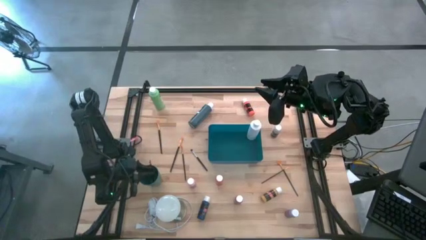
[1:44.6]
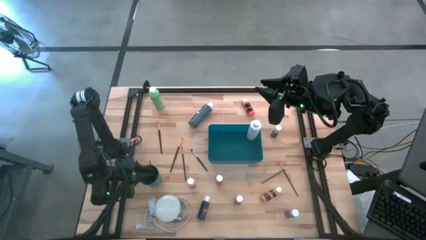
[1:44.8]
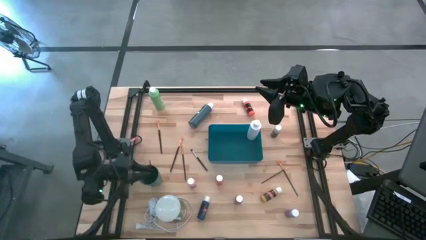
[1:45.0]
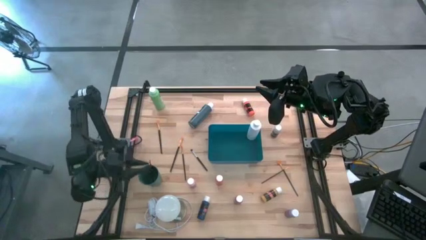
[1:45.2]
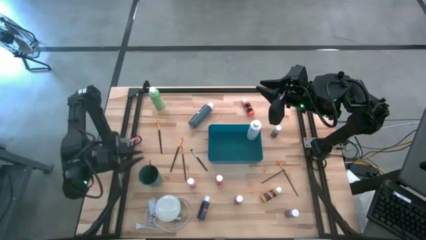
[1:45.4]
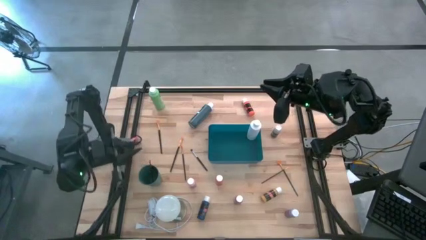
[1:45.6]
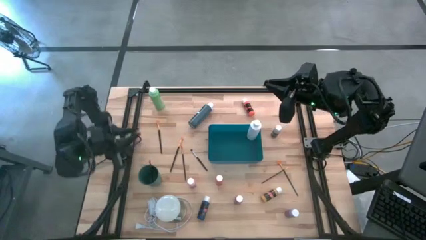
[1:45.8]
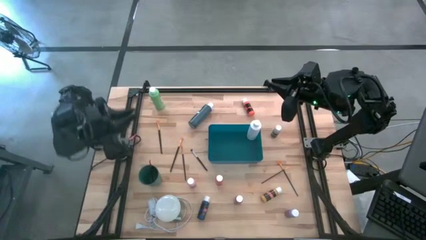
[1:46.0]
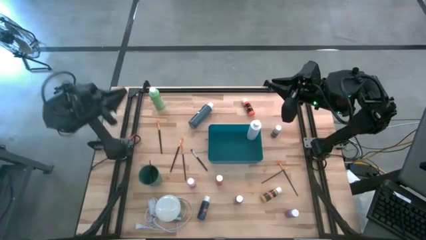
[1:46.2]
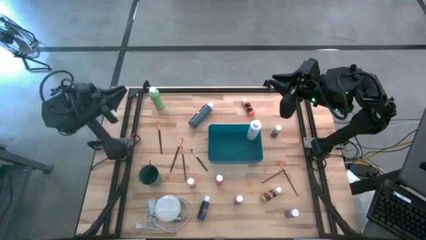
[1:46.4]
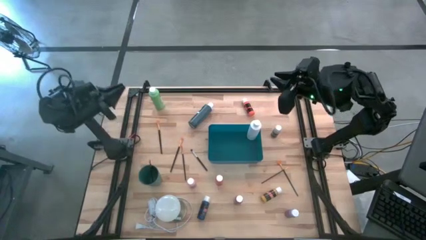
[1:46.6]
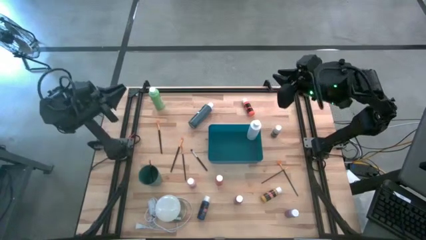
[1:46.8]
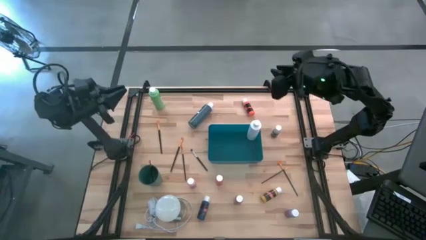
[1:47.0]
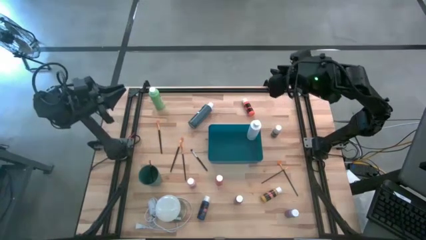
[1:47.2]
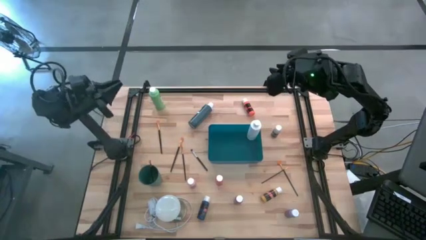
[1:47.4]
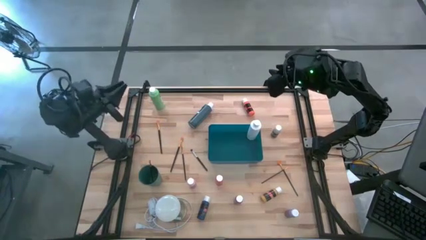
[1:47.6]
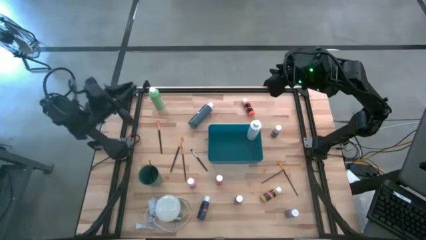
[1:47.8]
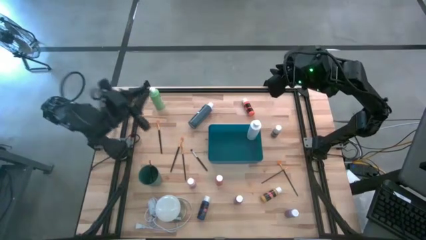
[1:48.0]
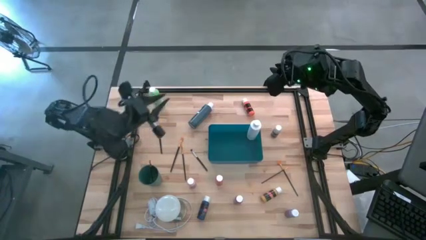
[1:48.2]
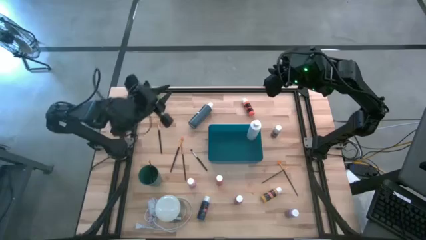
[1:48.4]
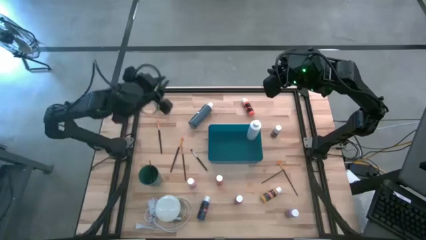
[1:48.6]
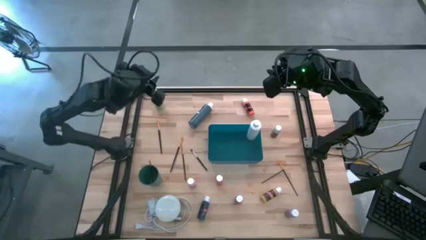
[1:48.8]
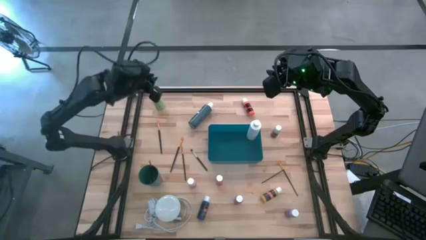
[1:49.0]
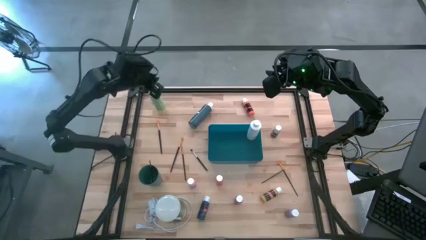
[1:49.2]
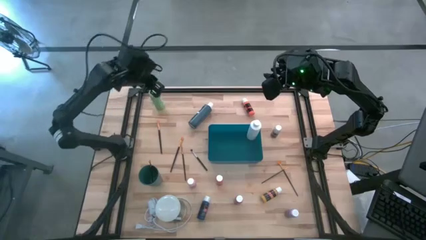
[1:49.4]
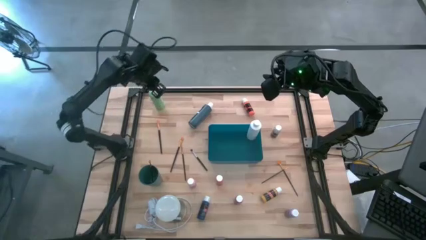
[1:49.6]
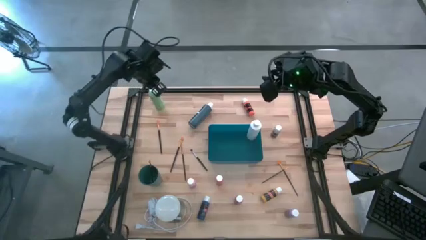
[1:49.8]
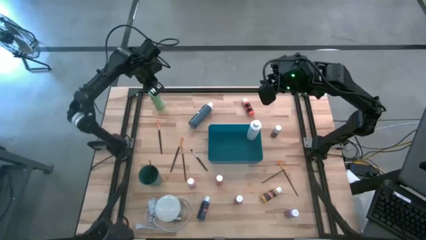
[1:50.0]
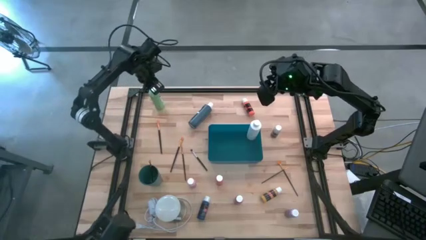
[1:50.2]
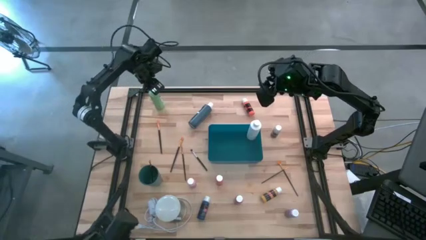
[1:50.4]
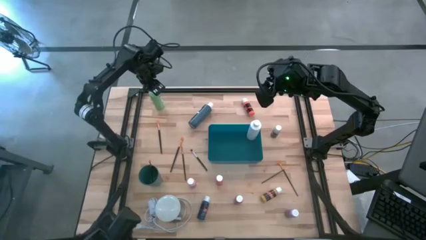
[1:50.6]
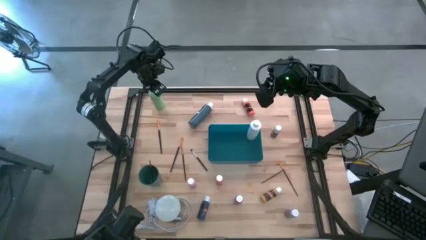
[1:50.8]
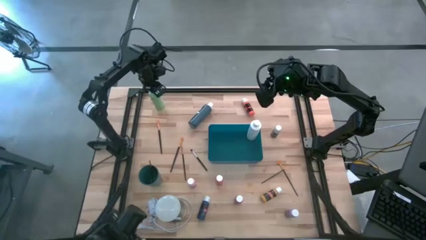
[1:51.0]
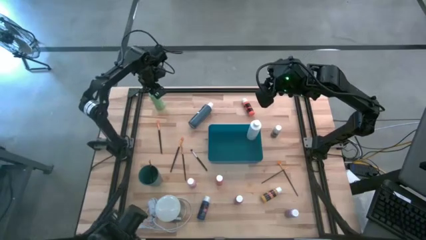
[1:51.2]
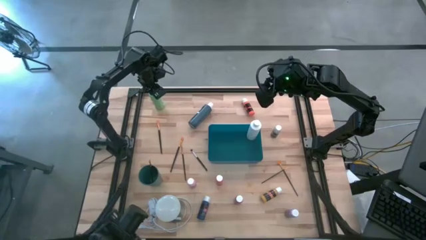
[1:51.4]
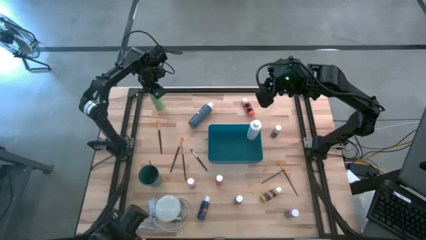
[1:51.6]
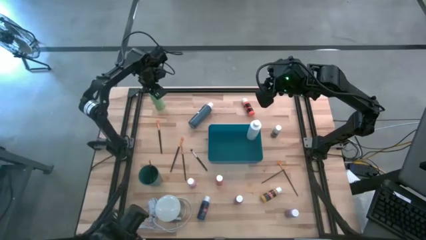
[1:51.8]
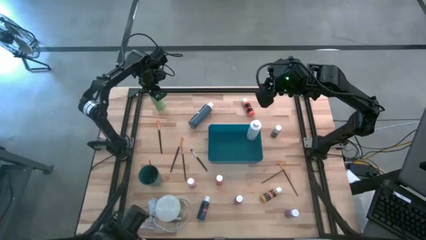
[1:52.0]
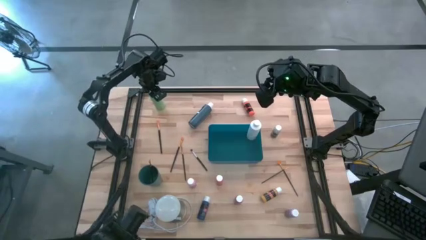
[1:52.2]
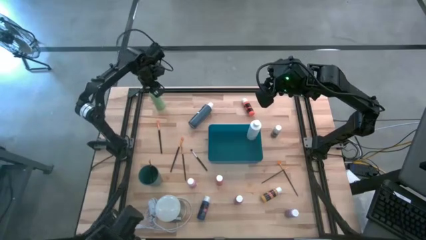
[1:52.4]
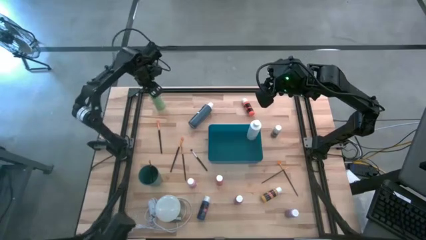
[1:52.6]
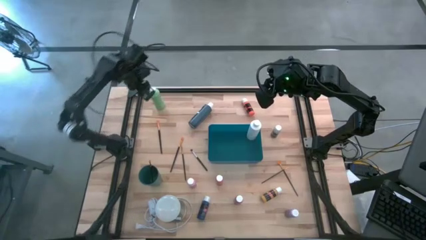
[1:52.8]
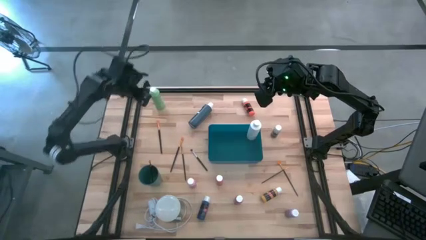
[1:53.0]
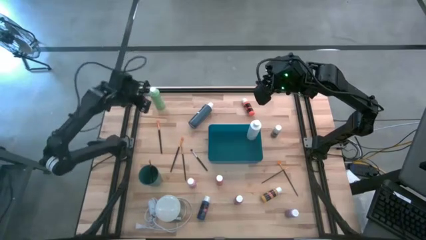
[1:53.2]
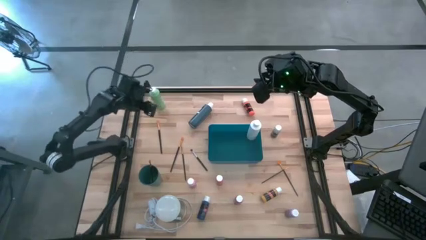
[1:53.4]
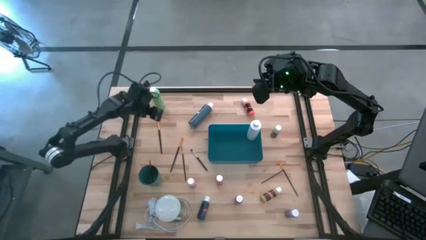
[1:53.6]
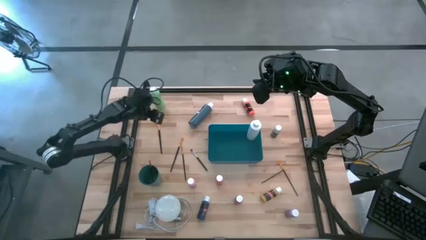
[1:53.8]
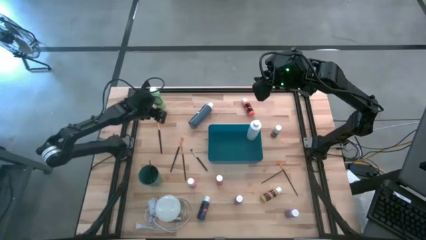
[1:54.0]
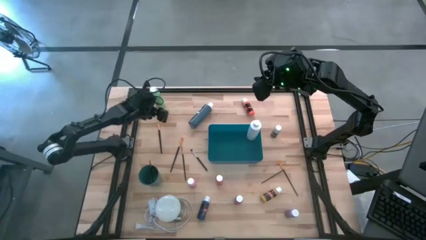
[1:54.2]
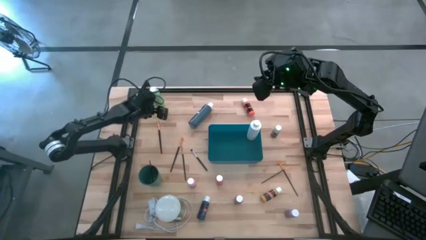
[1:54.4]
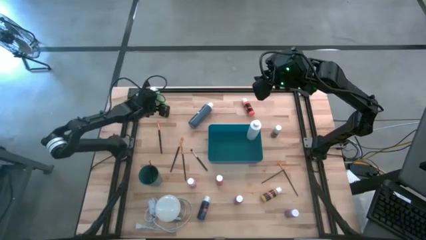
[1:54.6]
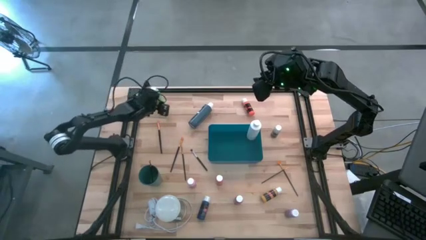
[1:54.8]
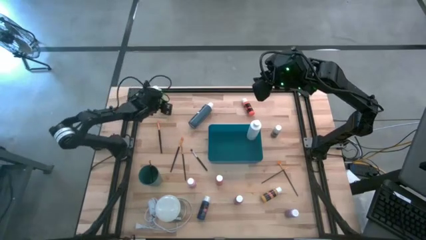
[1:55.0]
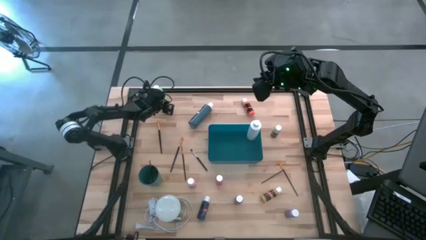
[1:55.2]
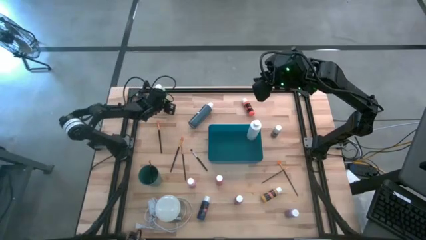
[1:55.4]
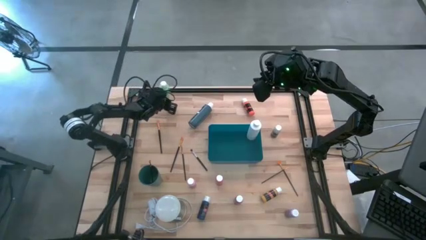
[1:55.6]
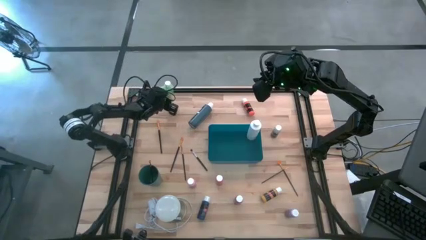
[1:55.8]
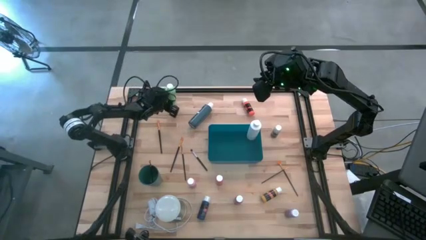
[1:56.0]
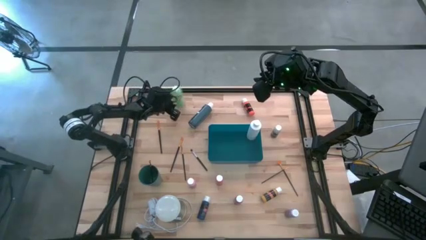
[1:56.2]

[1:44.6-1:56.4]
Task: Pick & Place Paint Supplies
Put the green paint bottle into the blue bin

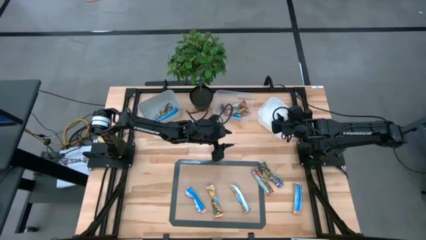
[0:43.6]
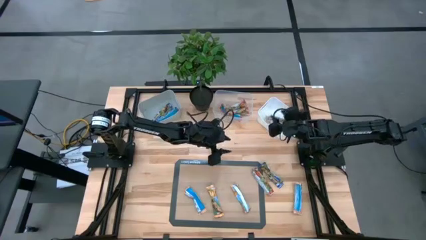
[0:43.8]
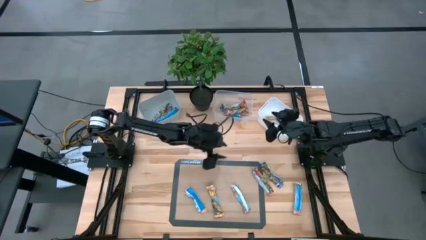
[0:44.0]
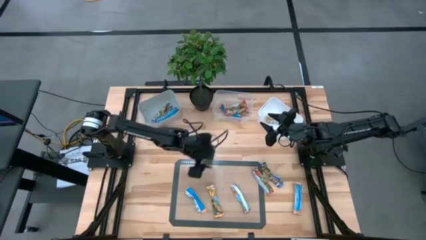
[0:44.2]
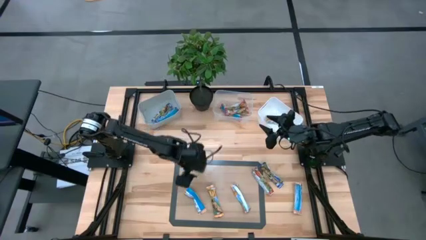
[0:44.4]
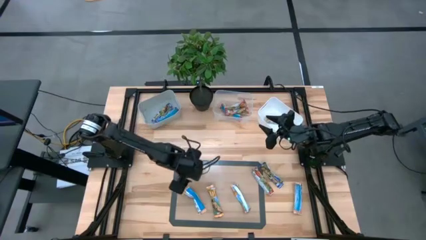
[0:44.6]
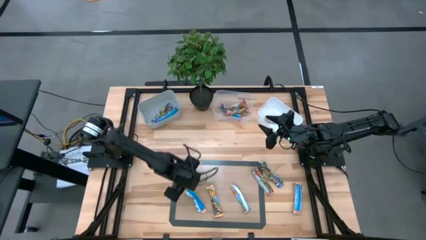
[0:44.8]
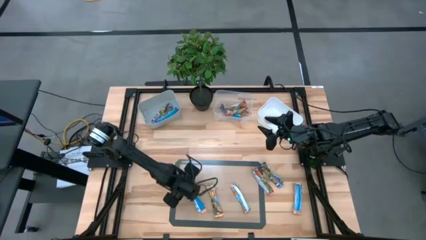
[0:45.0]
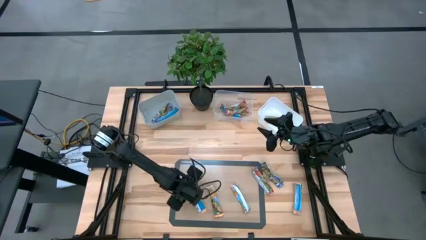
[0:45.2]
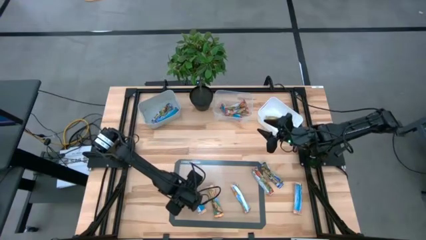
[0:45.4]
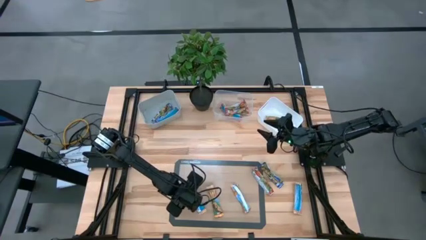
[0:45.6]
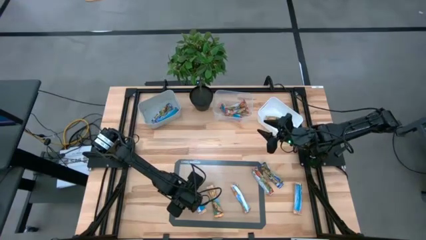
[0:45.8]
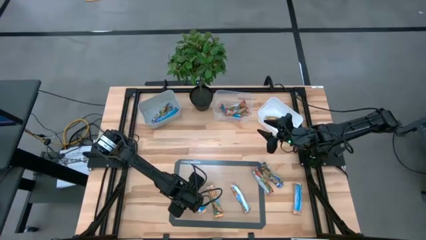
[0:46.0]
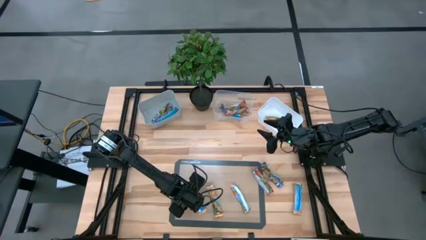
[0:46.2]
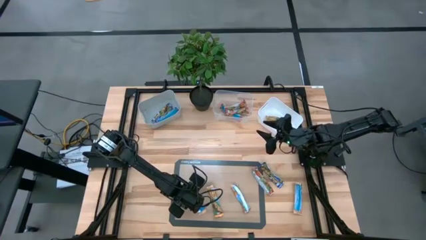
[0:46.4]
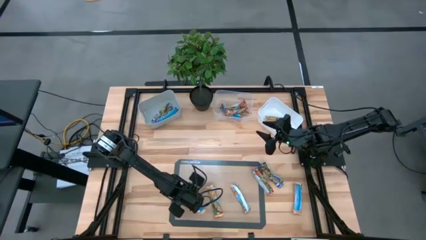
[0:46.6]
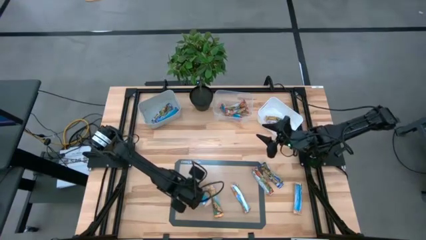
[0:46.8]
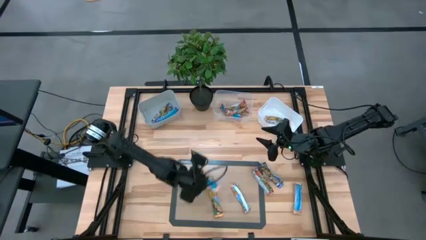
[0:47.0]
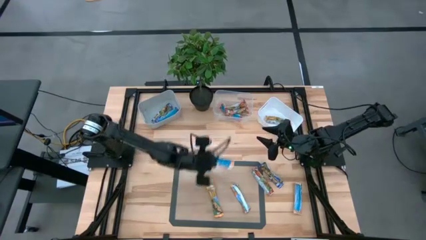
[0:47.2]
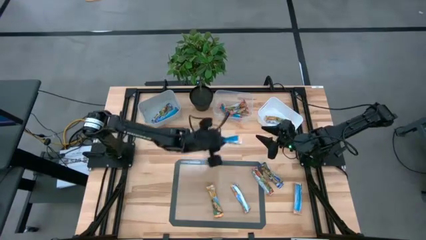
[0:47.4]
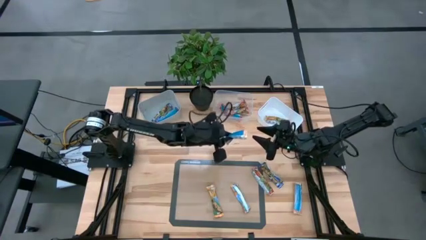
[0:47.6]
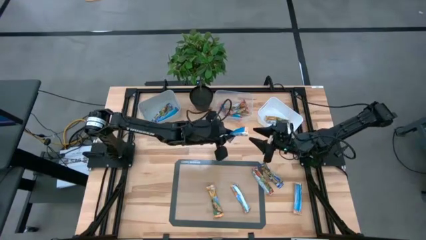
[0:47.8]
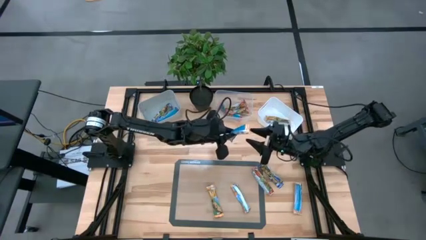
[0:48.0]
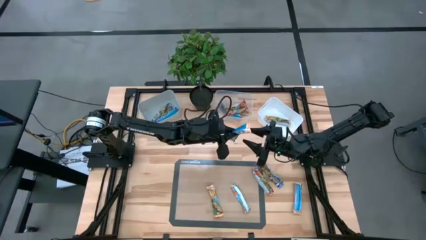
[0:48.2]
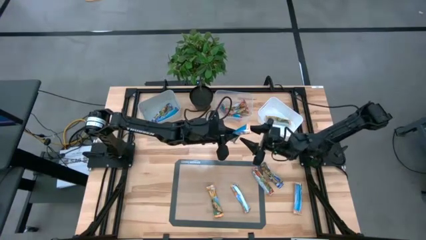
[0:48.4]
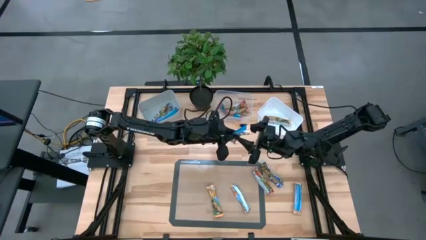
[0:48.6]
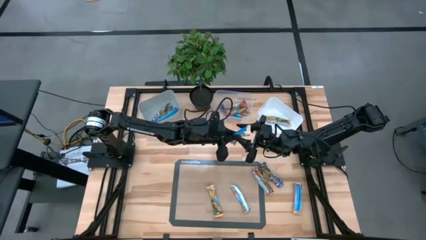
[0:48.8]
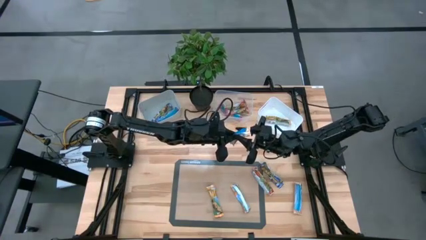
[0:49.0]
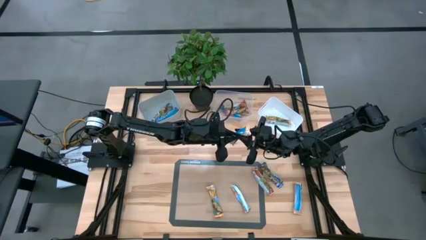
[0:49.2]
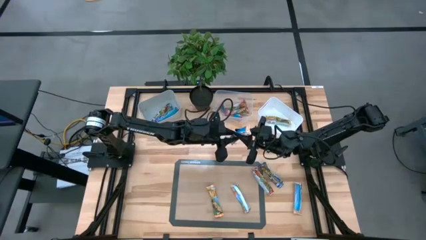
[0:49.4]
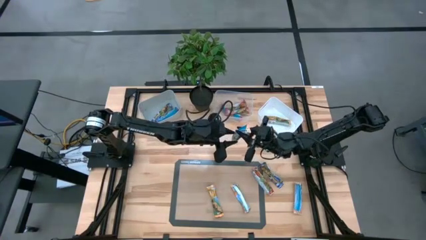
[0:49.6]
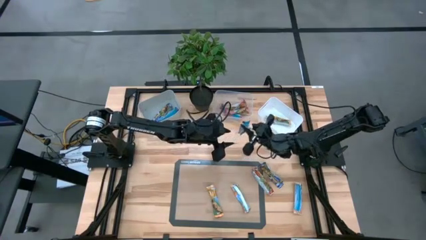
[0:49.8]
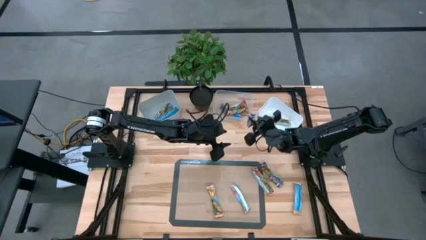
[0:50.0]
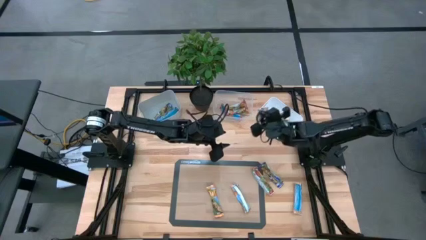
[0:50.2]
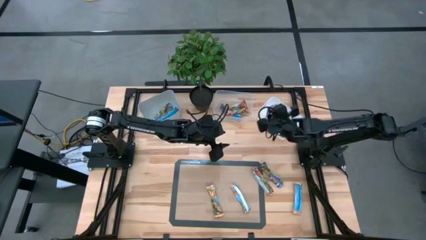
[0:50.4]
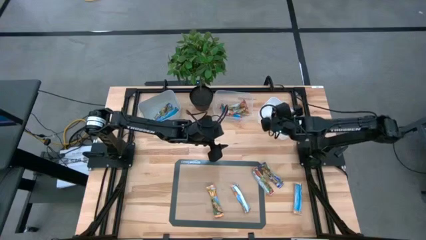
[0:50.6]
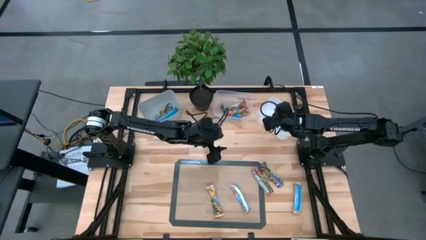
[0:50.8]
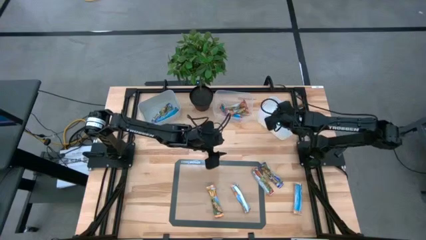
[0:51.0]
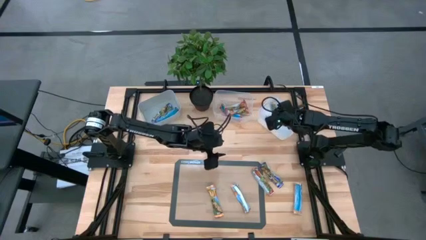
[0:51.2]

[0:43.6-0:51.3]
Task: Pick and place Granola Bars by type
Put the yellow granola bar into the white bin
